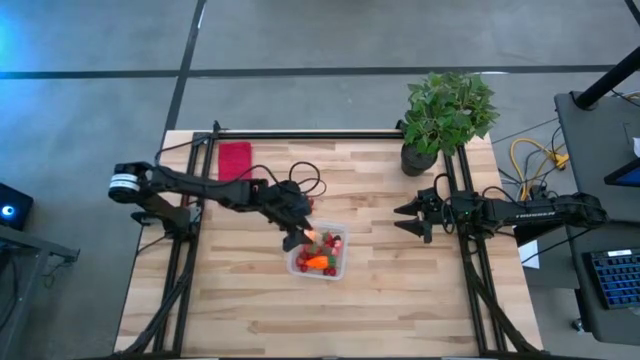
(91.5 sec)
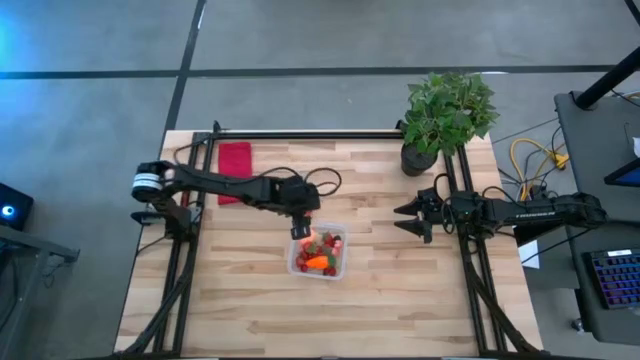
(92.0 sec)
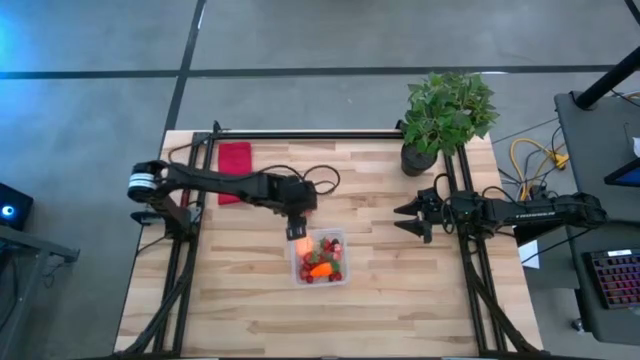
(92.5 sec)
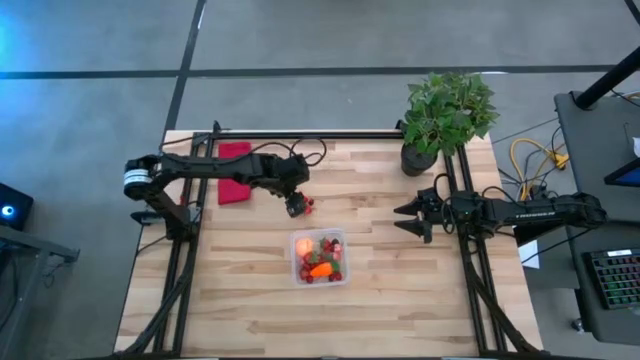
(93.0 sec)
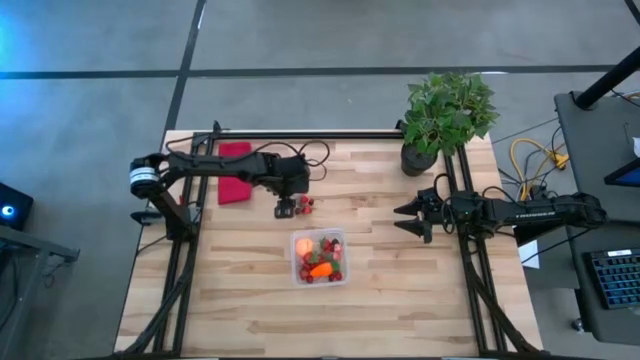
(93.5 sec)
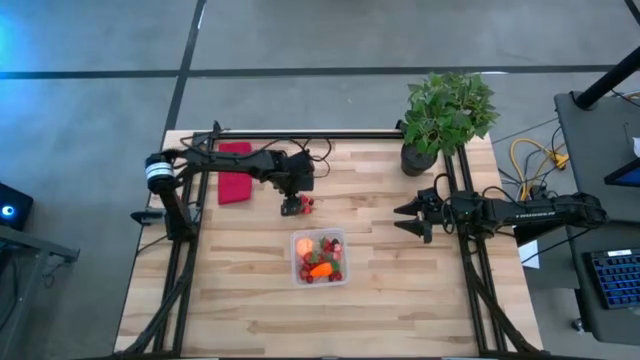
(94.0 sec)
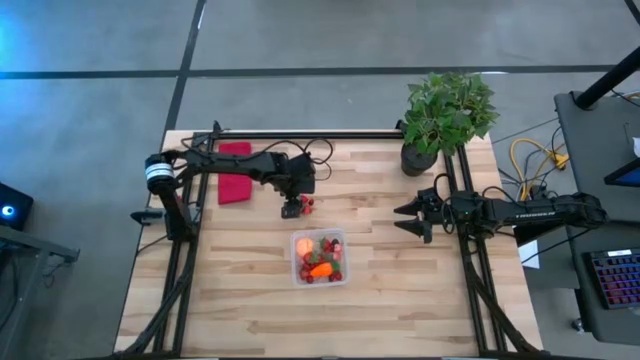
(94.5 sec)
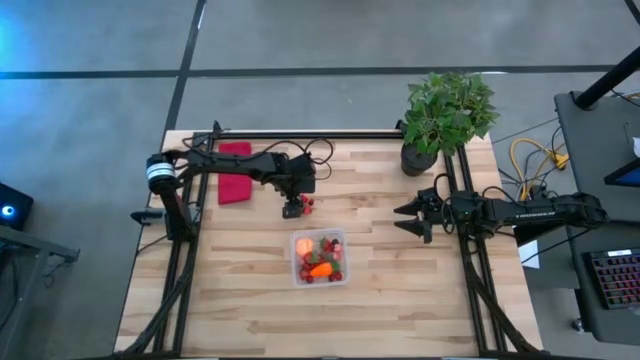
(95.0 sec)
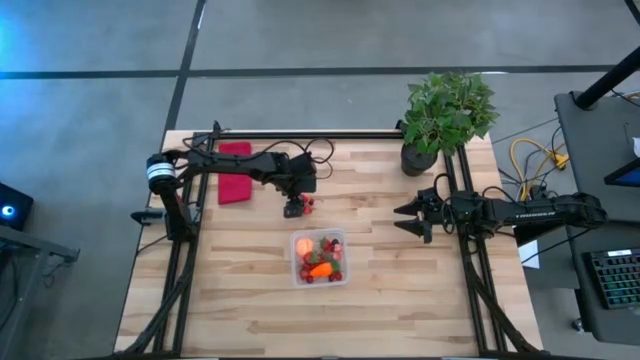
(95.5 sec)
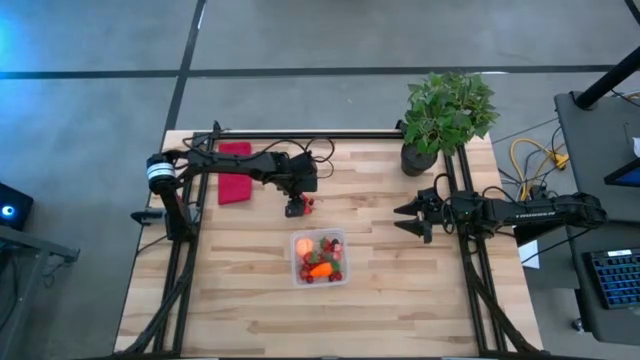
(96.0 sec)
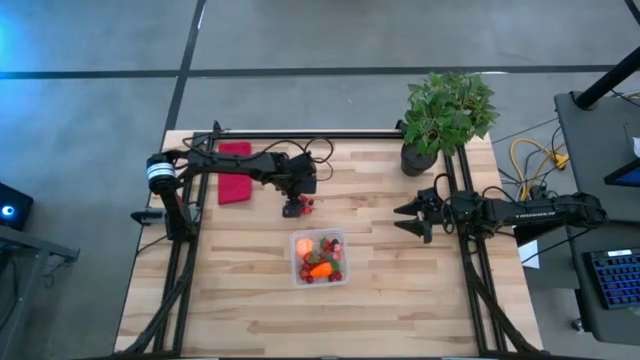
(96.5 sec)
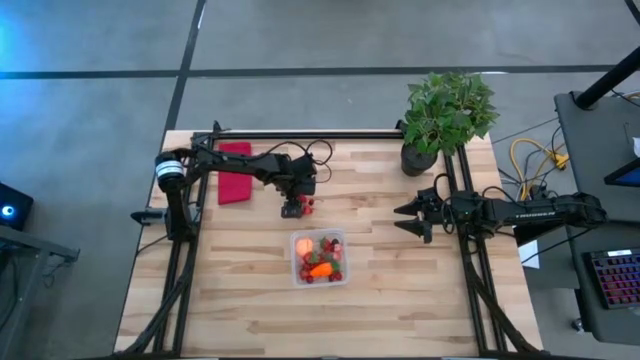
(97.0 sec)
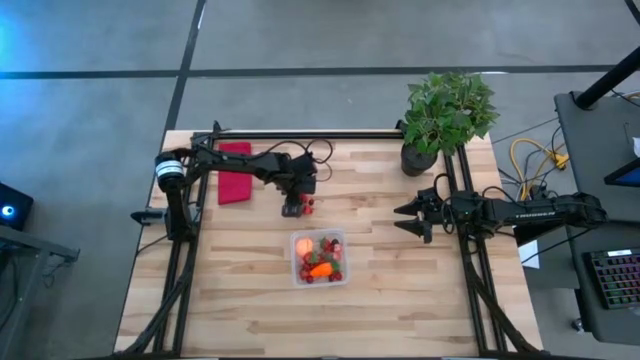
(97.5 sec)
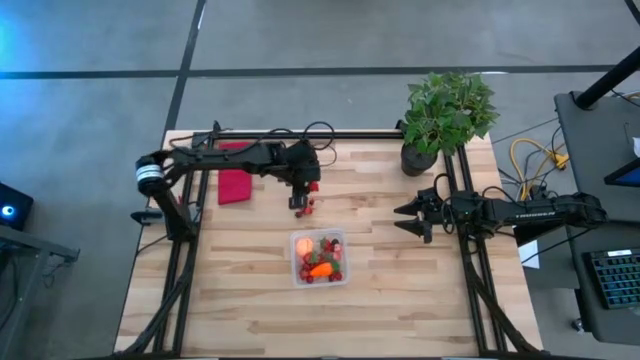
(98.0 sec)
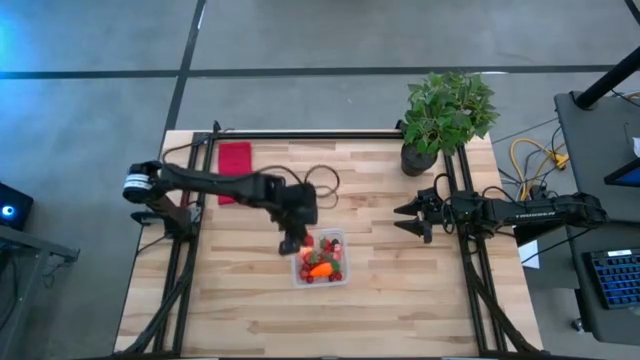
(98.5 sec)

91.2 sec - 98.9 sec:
Task: Pick and placing Produce into tupperware
Put the red strawberry into the transparent bin

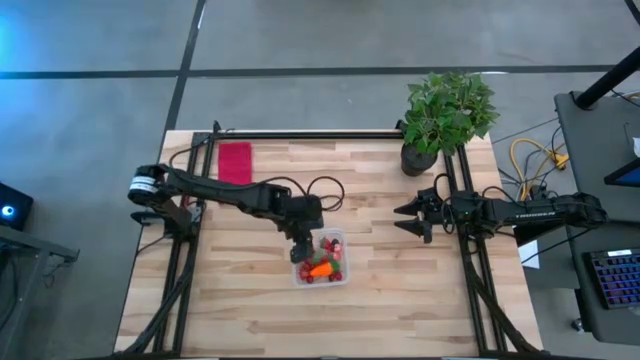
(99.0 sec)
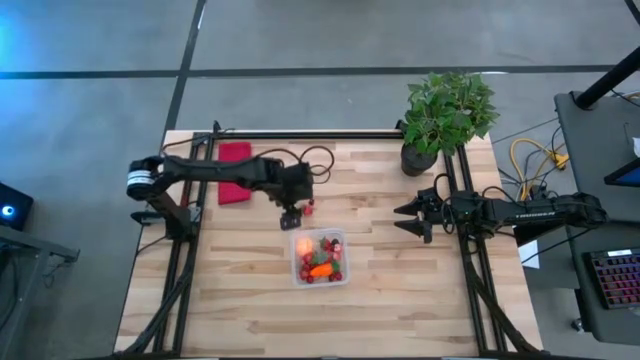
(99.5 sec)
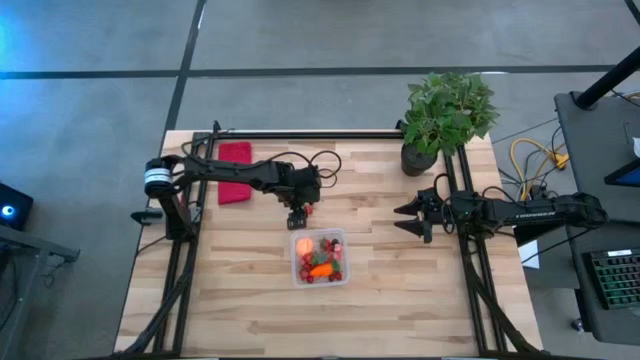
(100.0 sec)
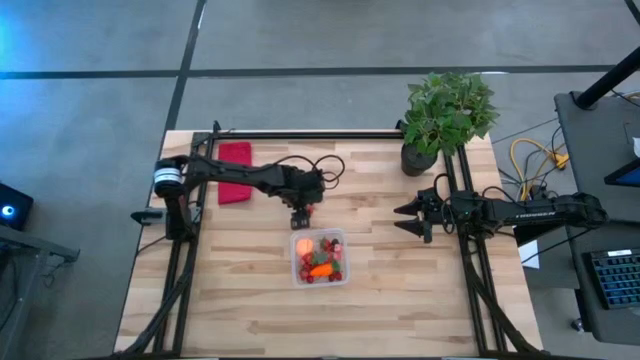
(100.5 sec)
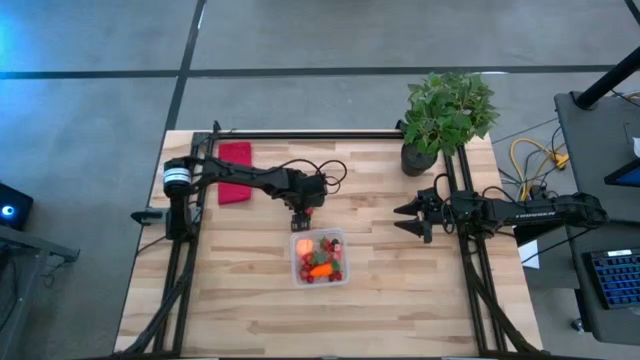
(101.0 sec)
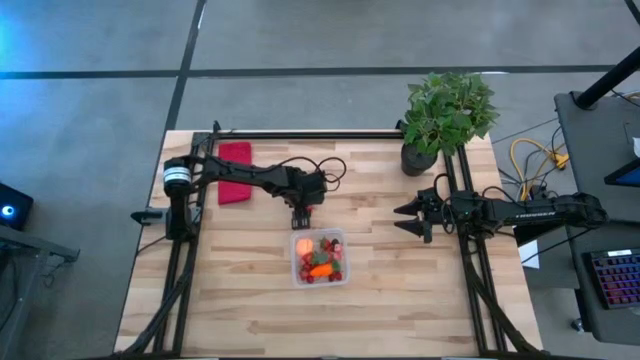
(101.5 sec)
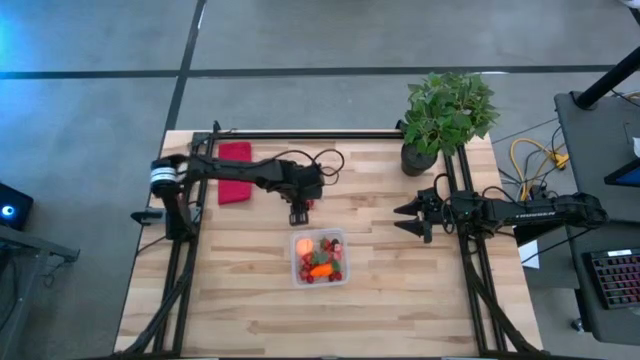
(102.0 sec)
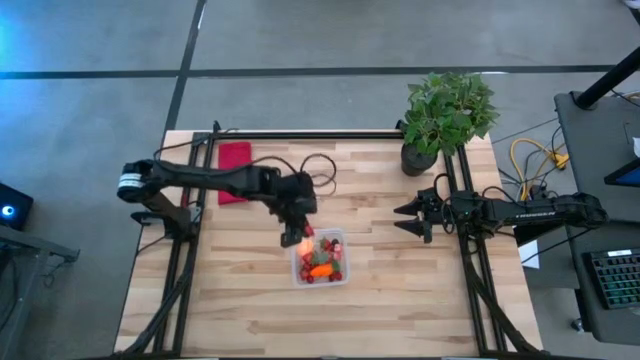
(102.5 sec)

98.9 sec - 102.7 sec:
Put the red strawberry into the transparent bin

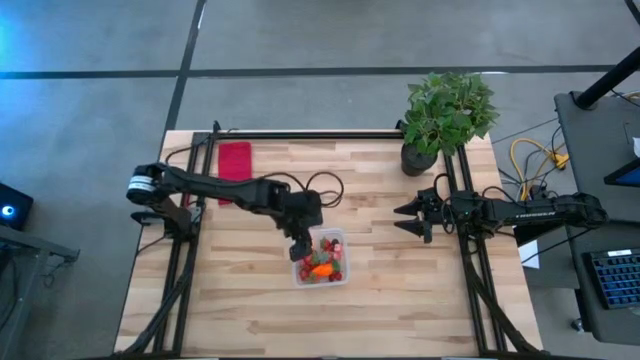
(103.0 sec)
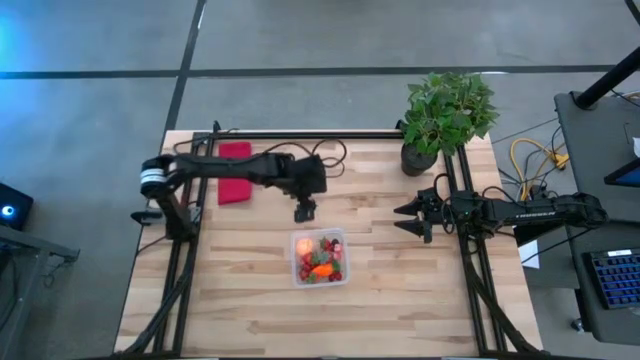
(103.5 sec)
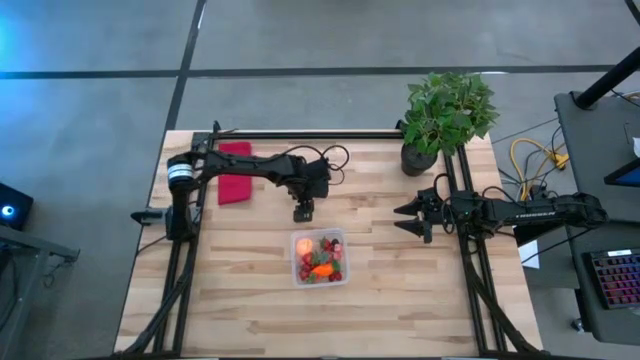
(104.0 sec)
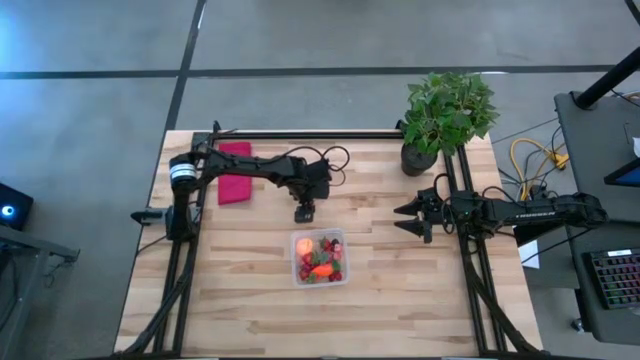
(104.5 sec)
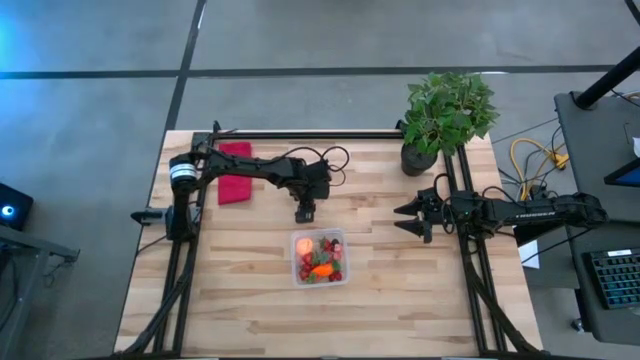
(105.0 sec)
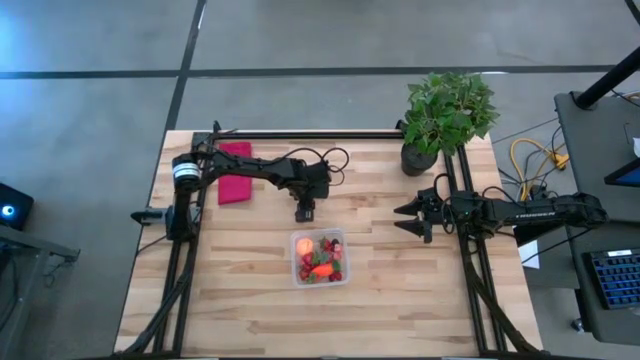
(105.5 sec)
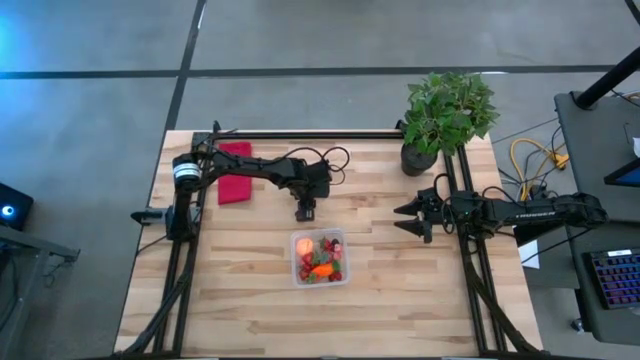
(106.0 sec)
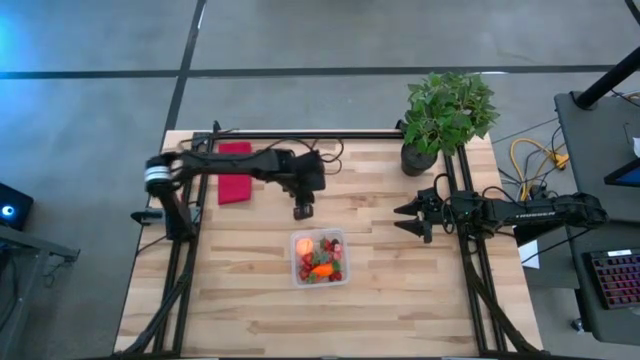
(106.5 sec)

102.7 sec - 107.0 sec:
Put the red cherry into the transparent bin

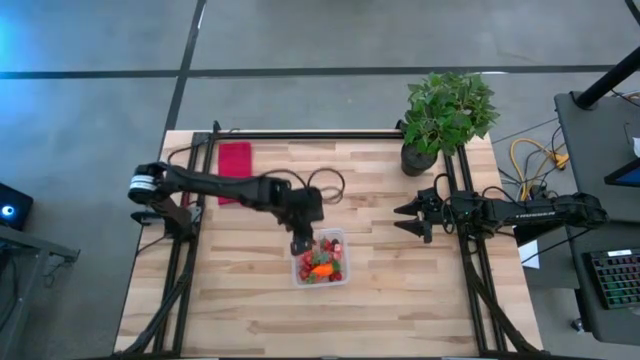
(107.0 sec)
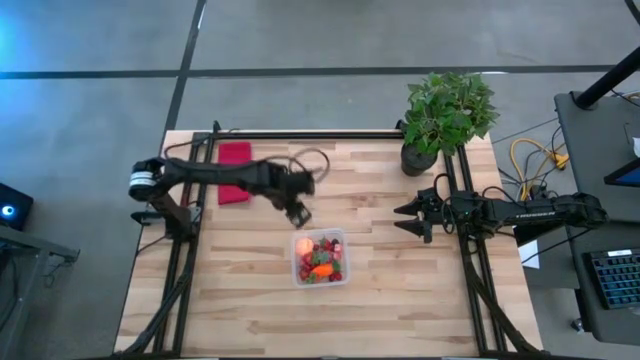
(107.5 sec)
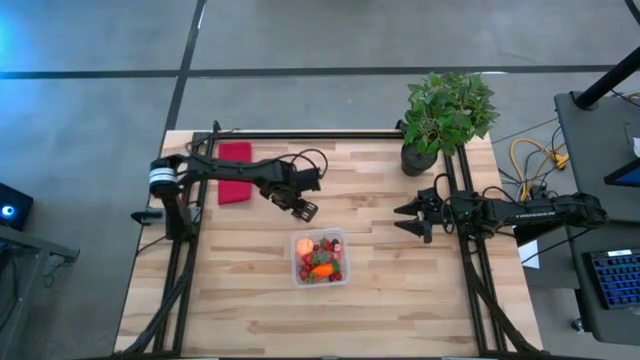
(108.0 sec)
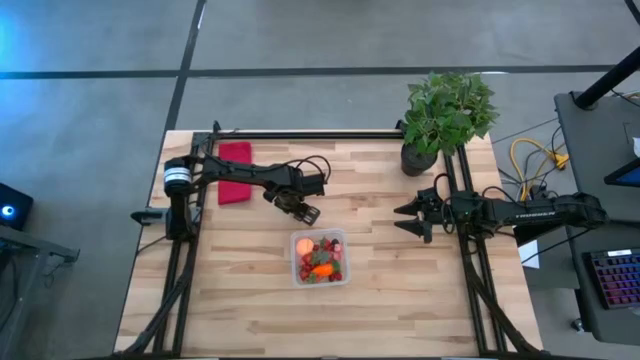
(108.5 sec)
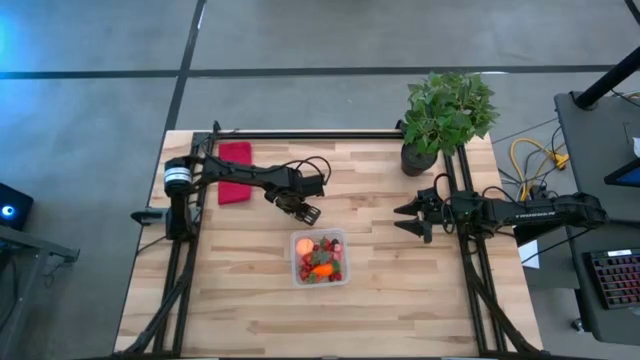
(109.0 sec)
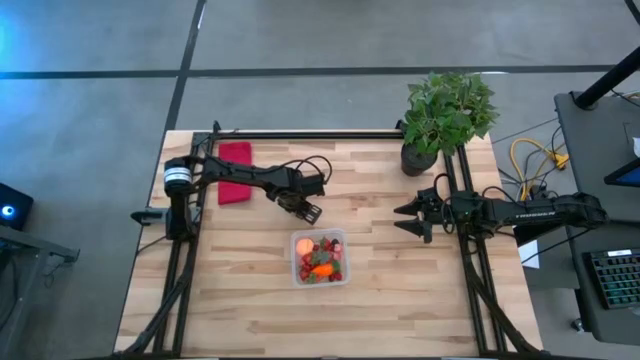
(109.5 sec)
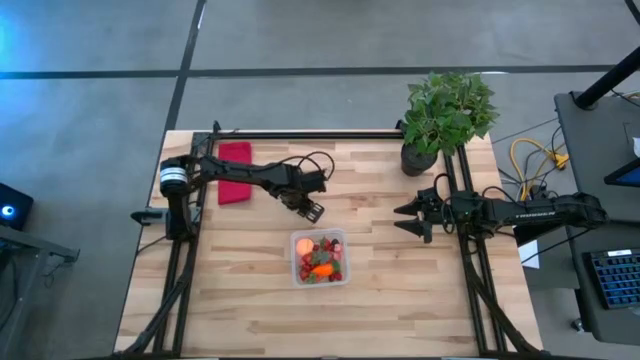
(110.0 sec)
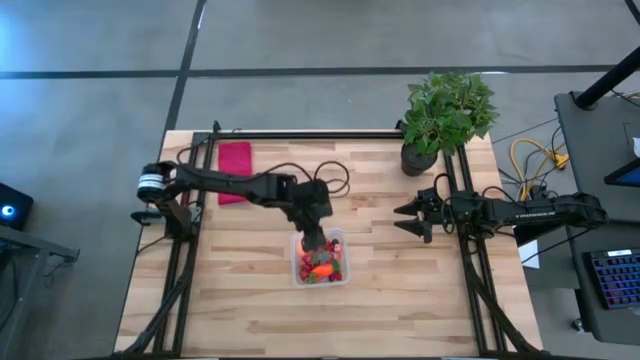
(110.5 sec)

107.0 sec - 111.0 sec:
Put the red cherry into the transparent bin

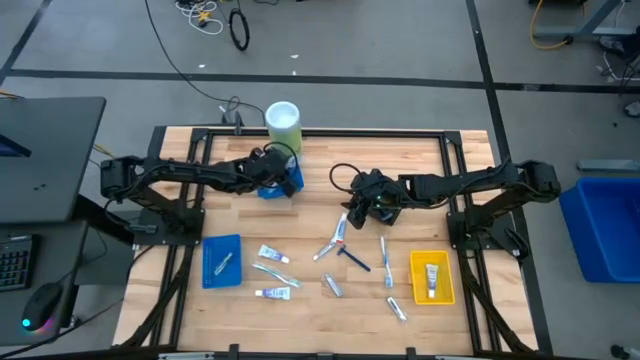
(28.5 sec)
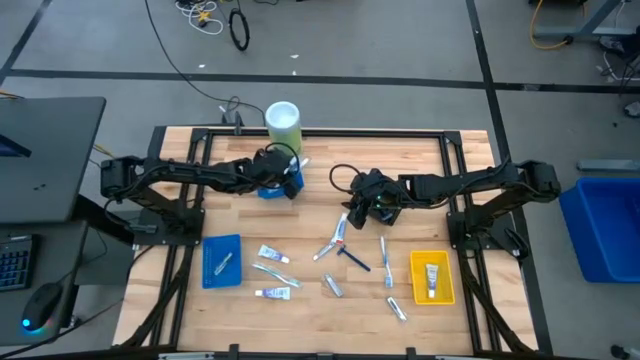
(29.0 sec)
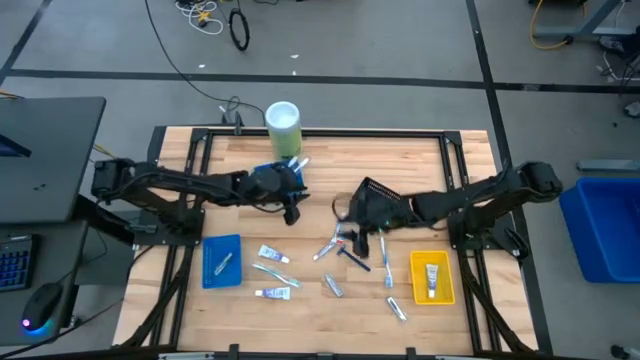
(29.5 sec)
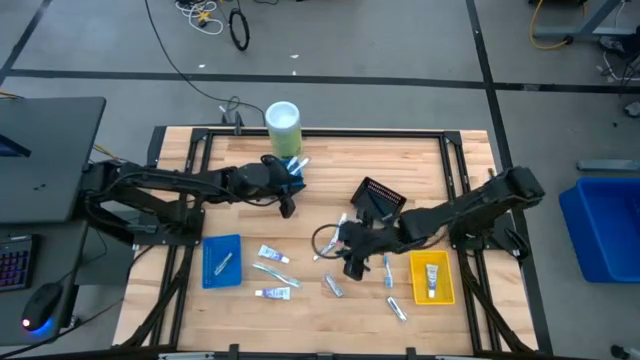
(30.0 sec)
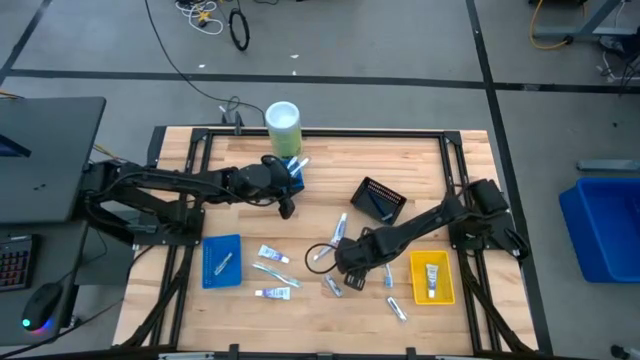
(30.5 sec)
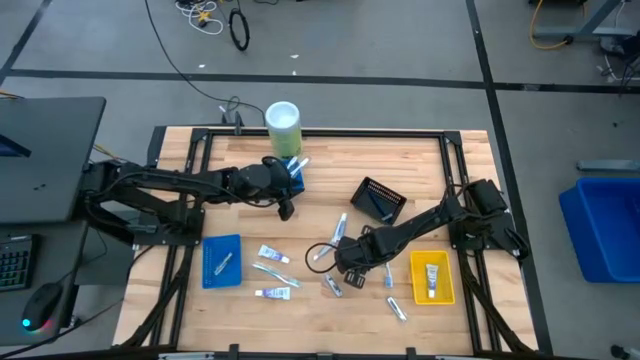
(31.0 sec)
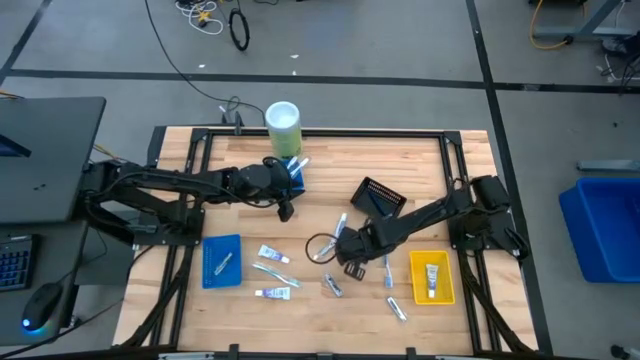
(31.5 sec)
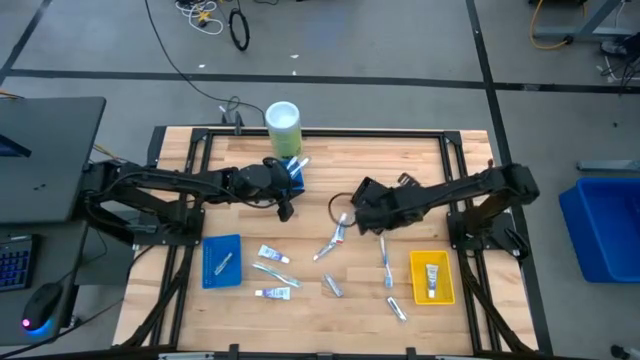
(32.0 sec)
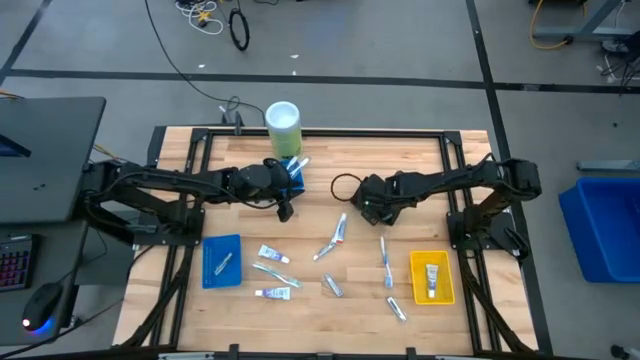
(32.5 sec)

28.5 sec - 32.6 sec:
Task: Pick & Place Travel size toiletries
Put the blue razor into the black bin
